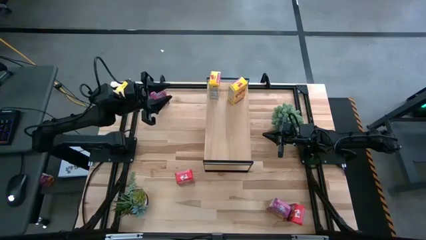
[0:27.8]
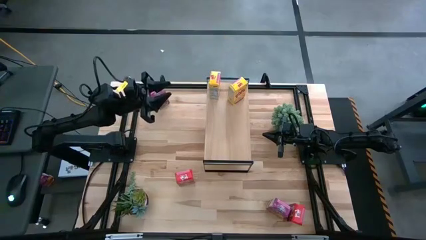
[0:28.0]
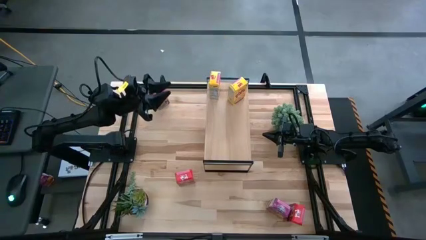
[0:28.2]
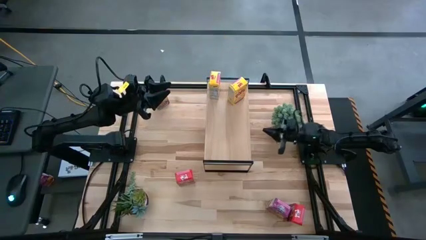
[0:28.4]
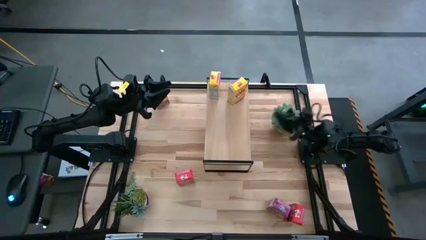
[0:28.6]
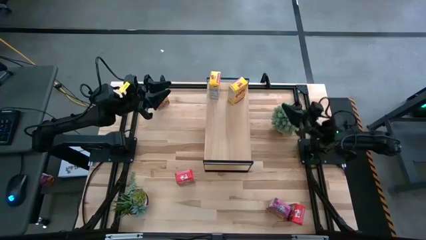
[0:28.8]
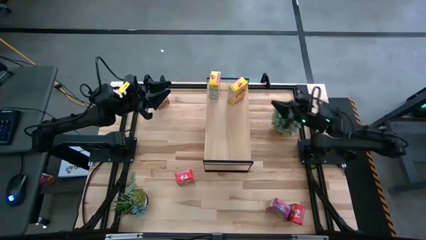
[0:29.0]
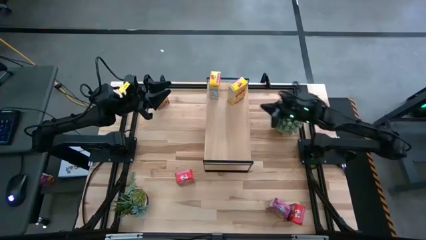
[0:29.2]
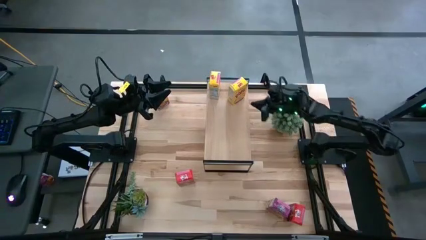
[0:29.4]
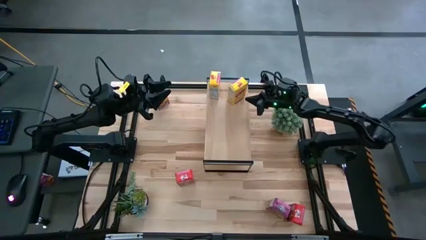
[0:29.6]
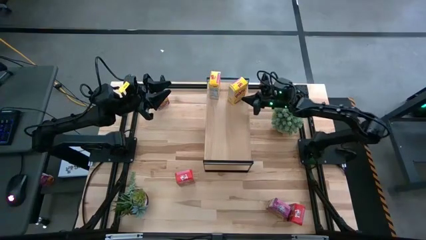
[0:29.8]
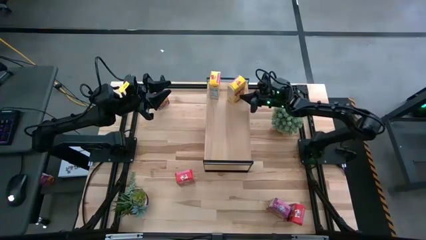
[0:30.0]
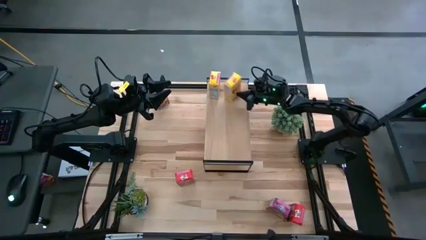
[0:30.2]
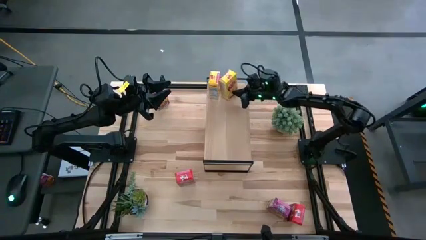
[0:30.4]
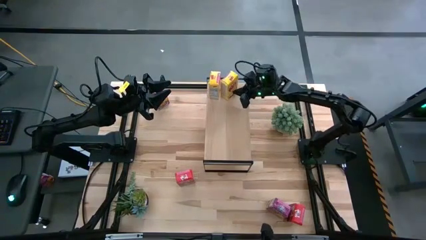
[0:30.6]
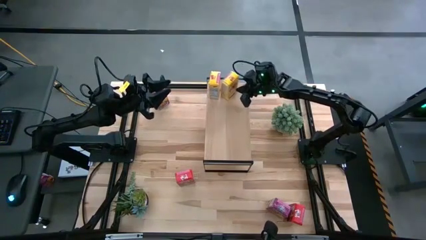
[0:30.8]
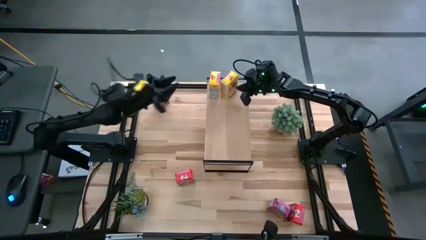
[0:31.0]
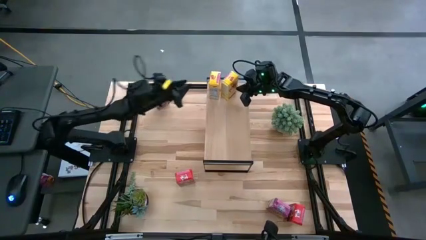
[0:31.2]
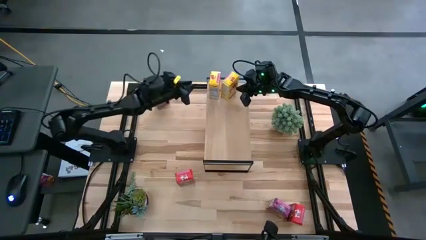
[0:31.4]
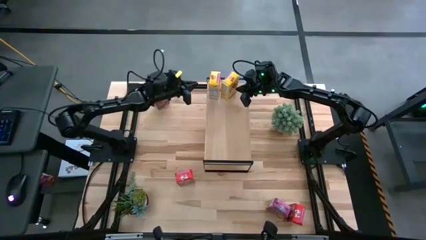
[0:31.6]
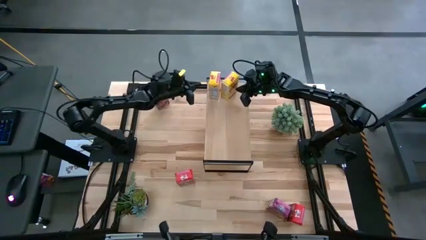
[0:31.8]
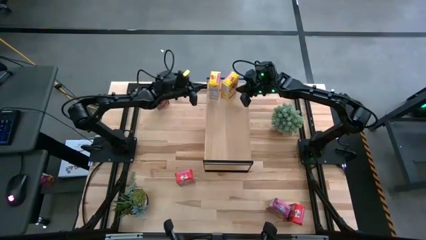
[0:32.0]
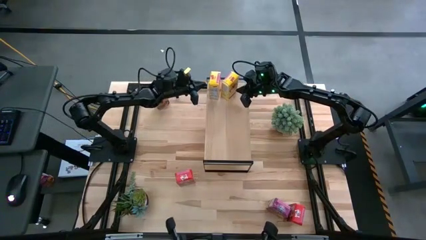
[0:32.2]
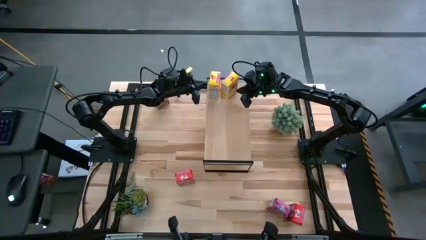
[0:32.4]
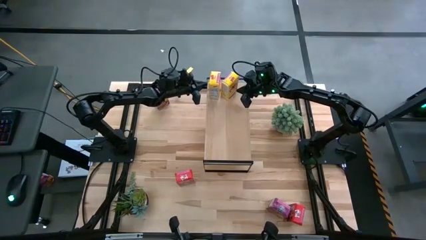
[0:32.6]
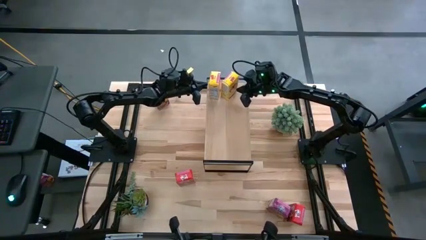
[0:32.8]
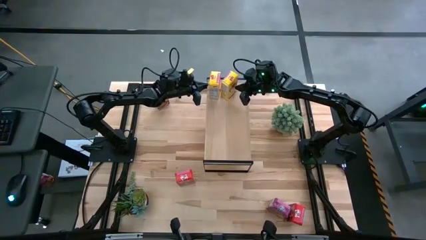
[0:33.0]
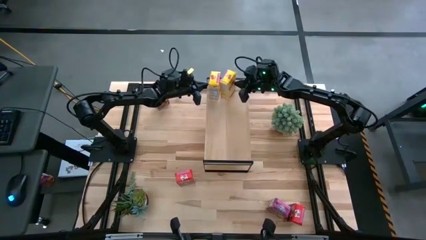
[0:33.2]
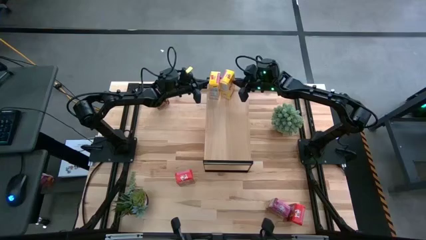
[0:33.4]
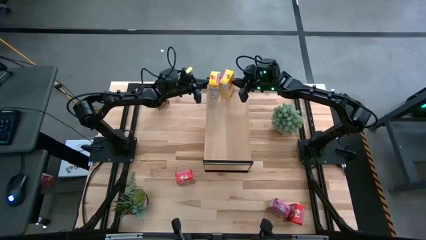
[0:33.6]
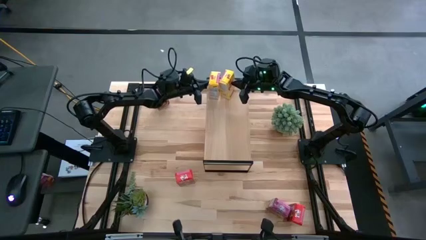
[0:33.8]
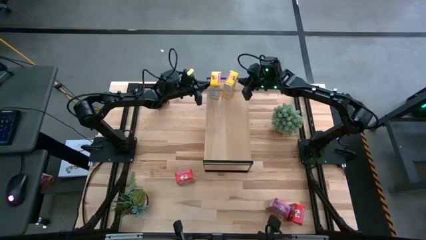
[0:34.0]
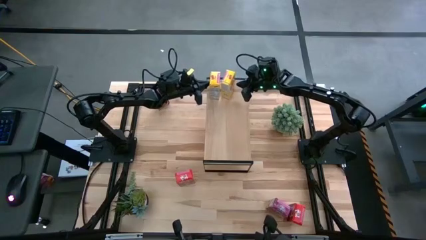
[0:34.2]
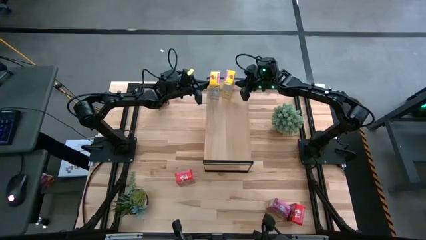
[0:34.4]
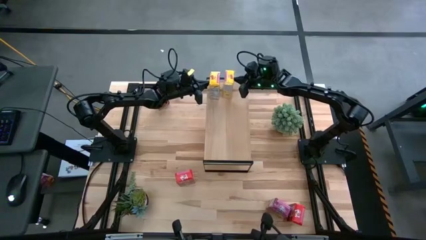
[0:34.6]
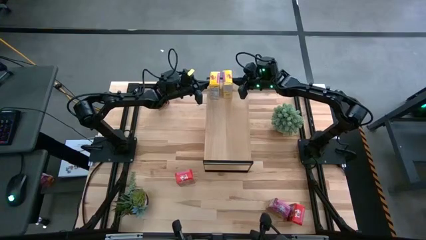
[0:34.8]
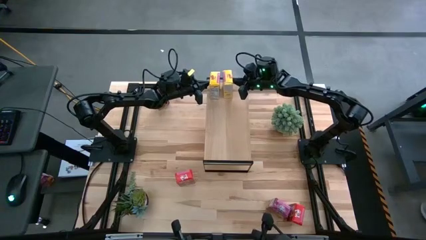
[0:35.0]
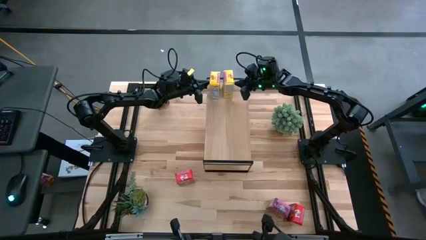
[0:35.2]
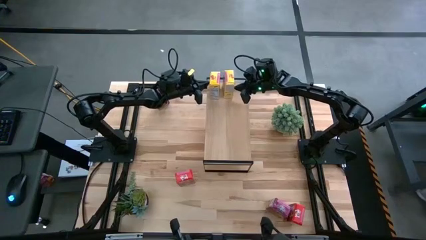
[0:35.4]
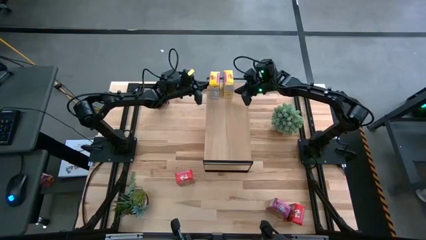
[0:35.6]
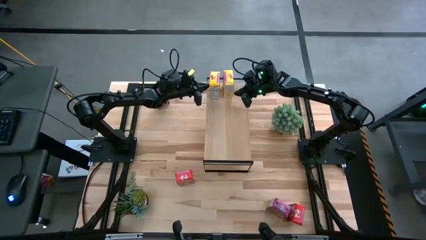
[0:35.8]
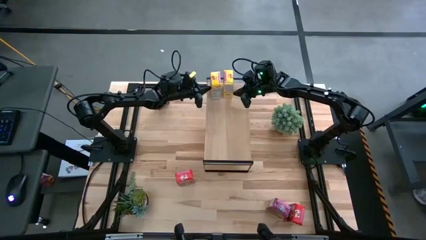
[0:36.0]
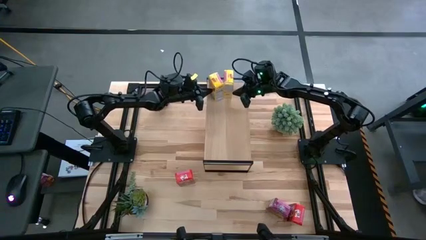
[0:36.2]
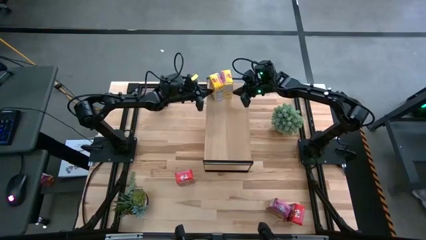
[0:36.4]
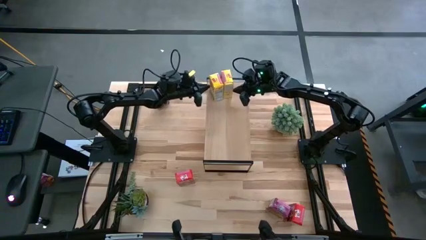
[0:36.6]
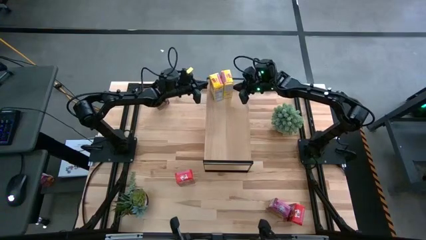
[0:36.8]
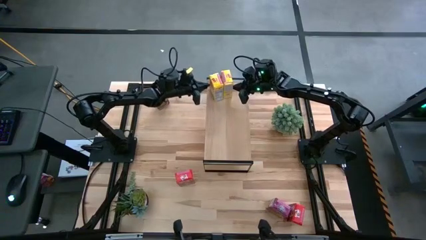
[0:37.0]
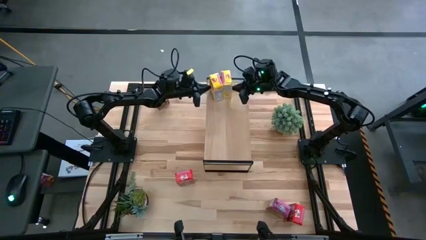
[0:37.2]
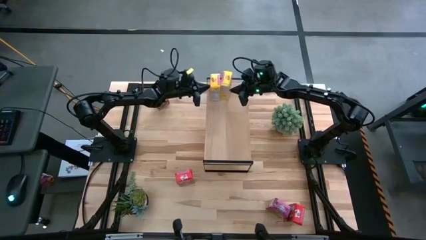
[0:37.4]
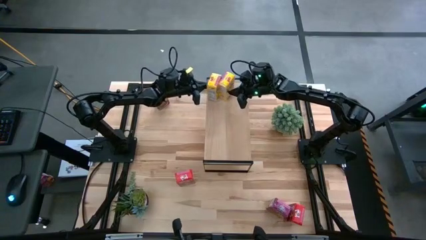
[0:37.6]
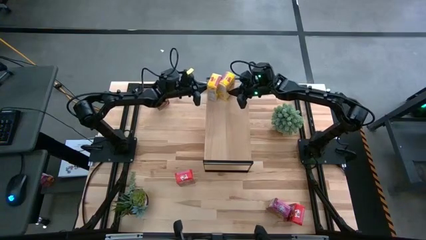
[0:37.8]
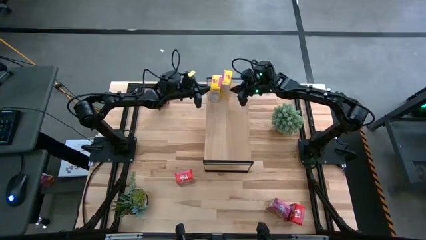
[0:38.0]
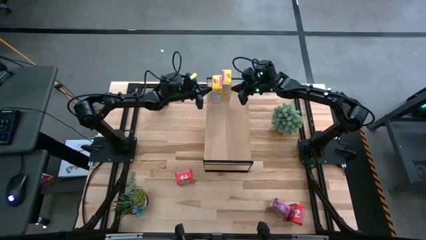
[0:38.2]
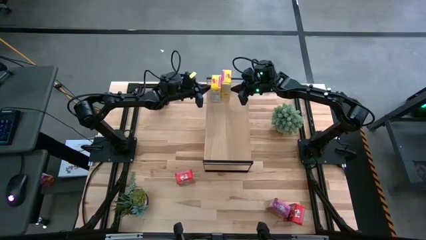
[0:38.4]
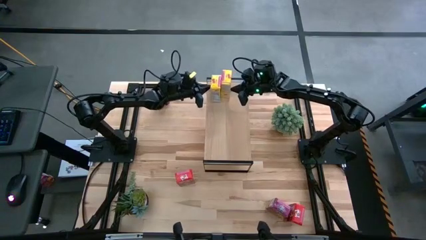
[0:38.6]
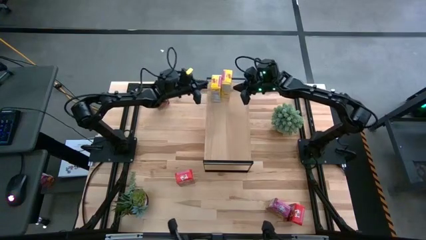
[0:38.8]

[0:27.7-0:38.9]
Task: Stack cereal on shelf
Align the yellow cereal box with the other yellow cereal box on the shelf

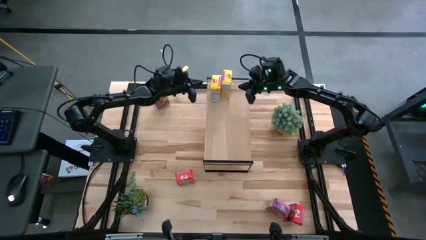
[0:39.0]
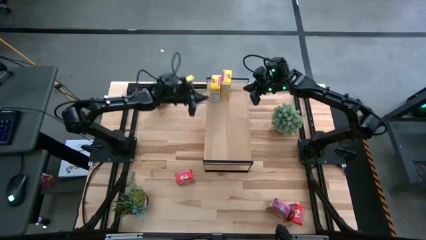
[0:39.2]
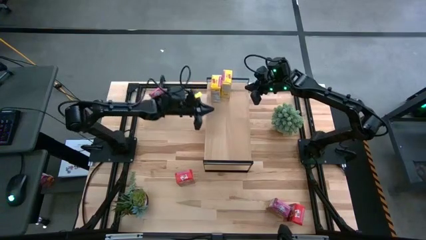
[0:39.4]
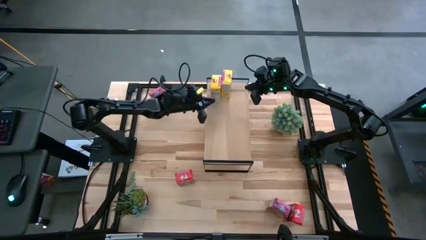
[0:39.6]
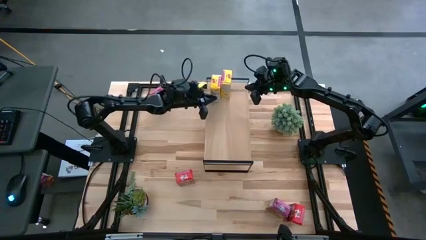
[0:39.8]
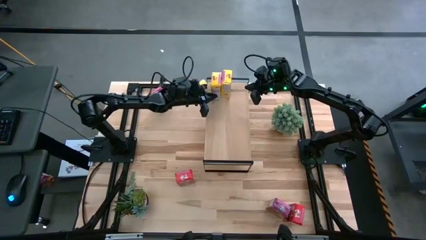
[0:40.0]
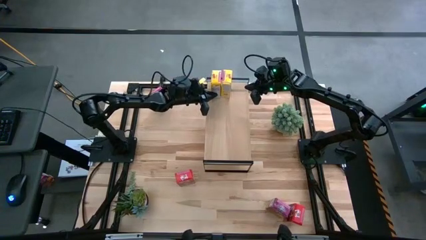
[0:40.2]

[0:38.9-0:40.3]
Adjust the yellow cereal box
